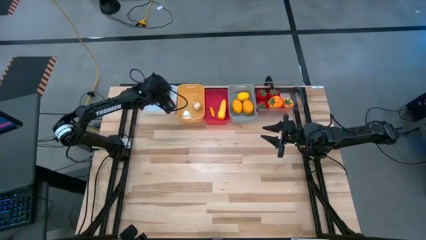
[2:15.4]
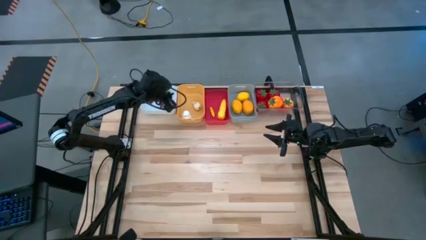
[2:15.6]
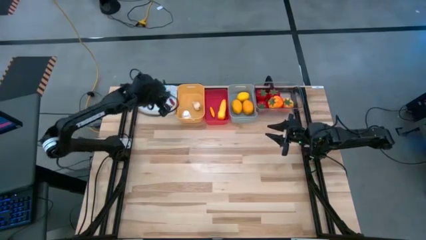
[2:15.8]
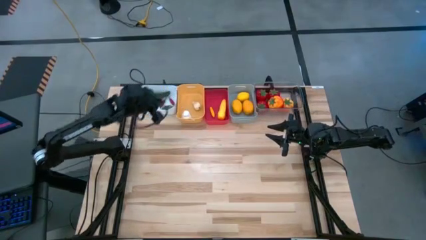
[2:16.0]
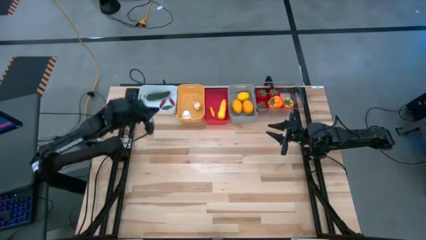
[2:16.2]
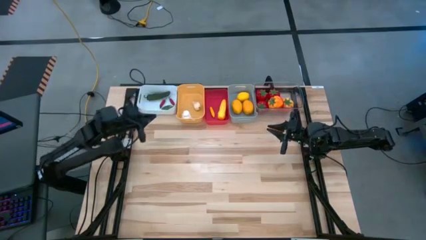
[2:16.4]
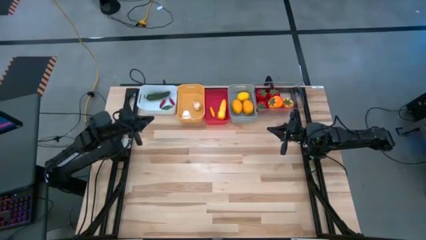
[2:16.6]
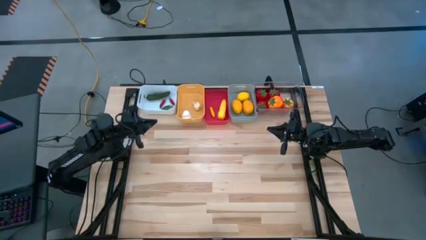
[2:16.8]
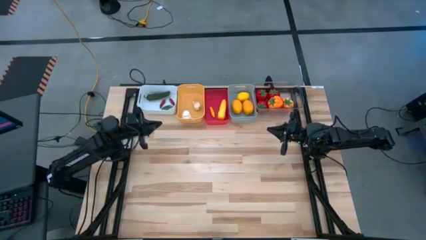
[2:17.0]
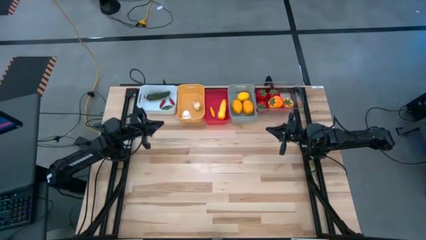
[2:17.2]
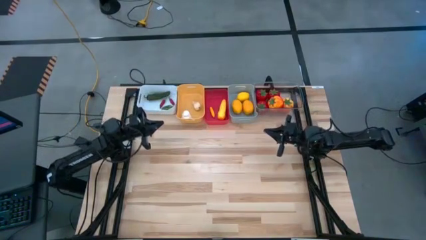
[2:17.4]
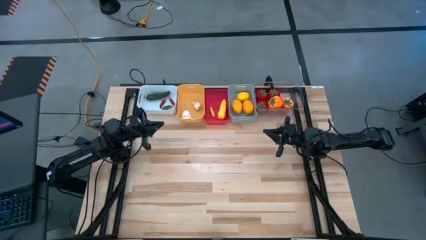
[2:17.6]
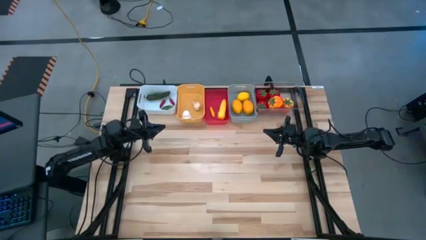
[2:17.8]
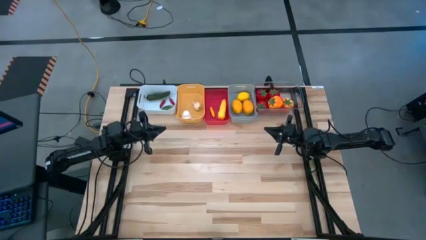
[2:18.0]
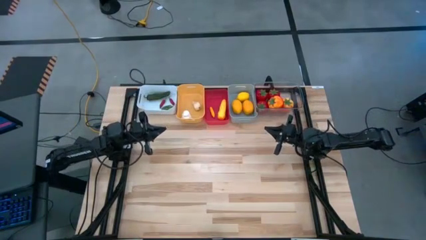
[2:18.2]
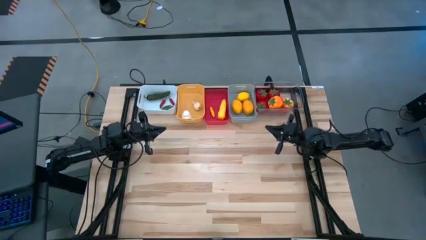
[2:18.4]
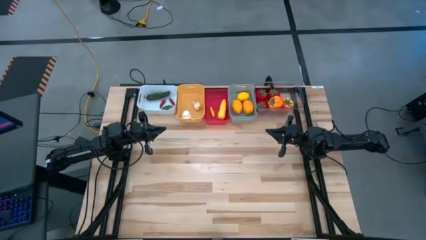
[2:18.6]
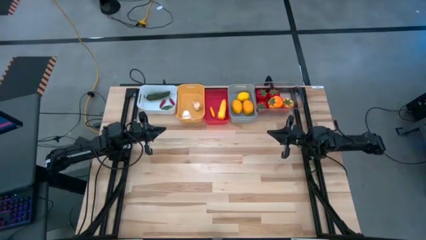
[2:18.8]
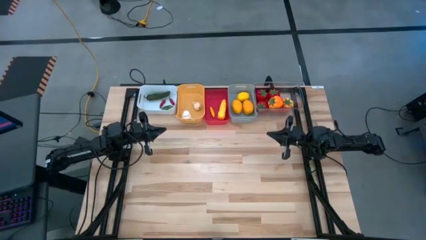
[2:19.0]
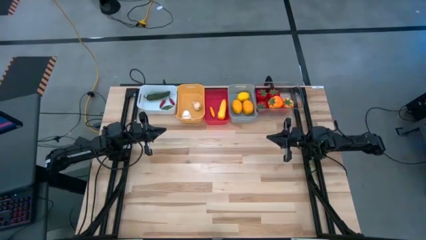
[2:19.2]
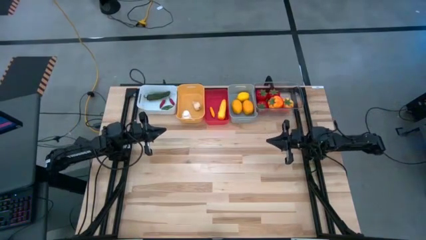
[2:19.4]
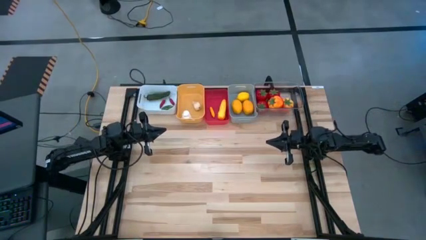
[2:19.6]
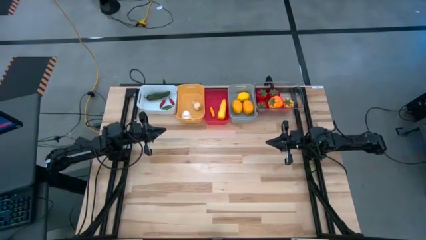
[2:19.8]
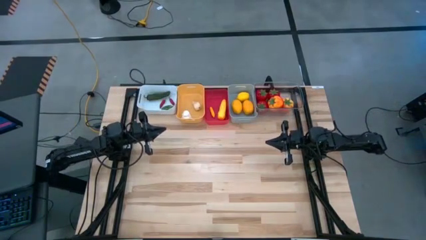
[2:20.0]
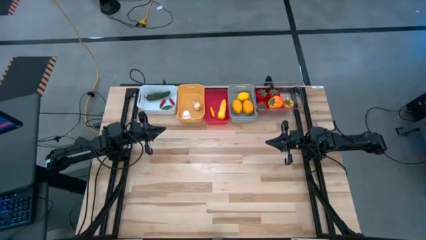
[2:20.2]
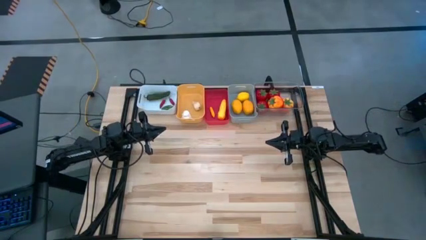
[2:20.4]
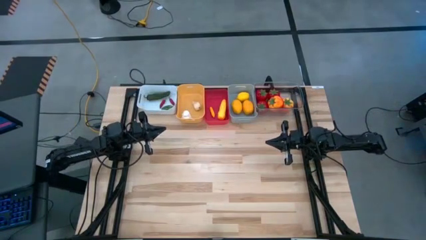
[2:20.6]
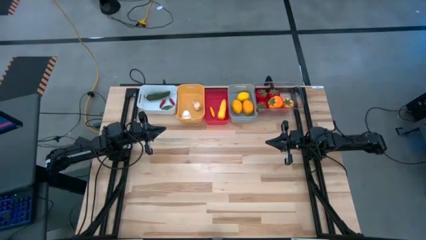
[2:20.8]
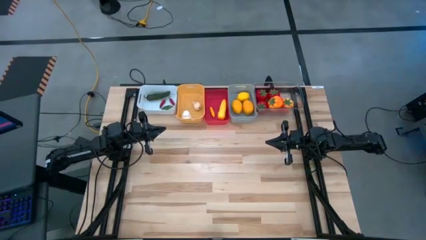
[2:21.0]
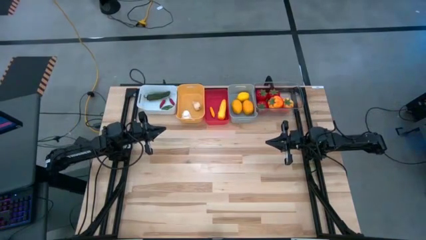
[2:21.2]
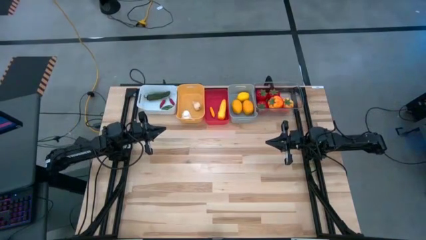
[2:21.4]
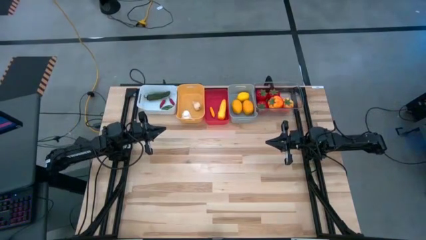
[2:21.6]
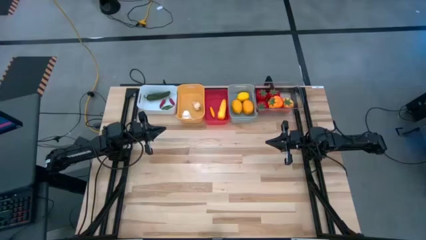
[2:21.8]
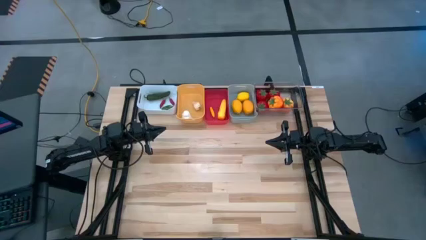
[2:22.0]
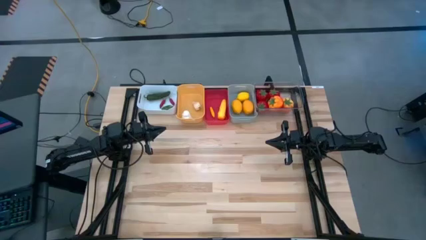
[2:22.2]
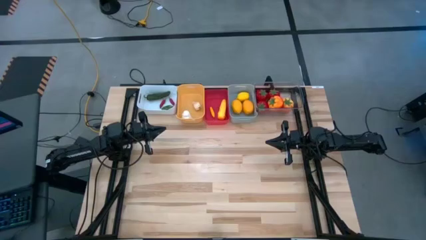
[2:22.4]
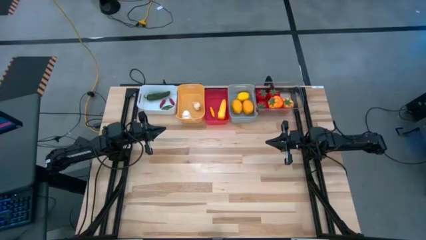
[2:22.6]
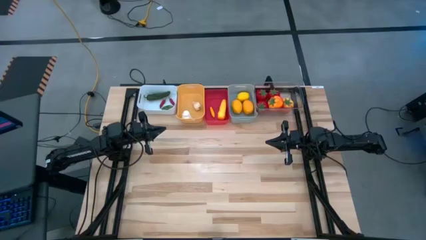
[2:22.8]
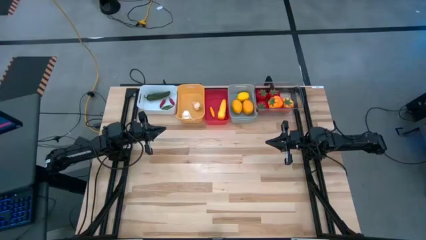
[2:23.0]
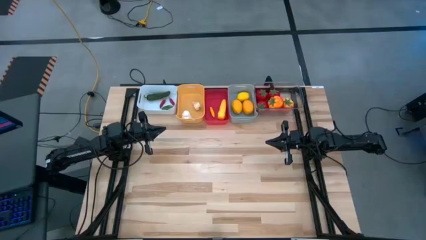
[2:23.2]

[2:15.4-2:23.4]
Task: Sort produce into baskets
Return to Home Position

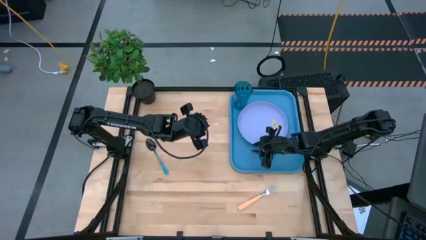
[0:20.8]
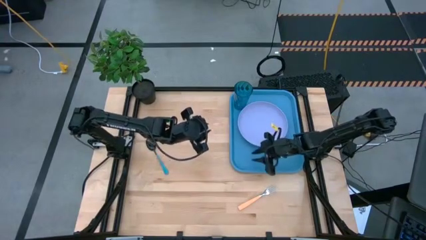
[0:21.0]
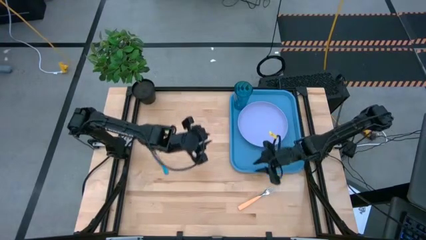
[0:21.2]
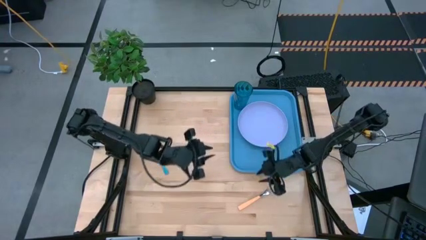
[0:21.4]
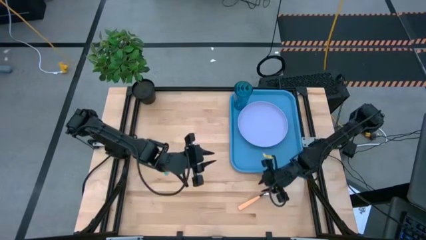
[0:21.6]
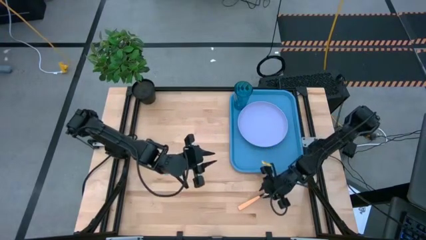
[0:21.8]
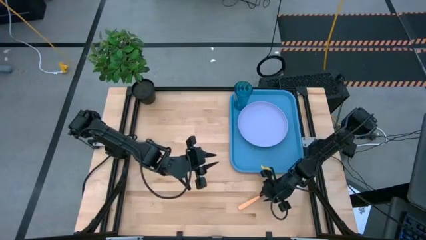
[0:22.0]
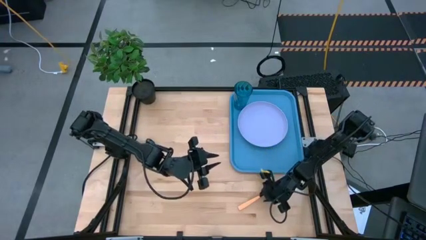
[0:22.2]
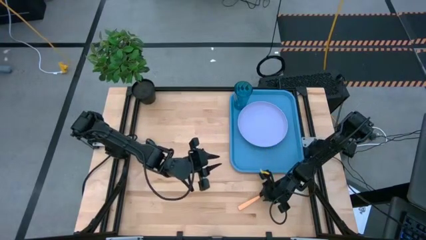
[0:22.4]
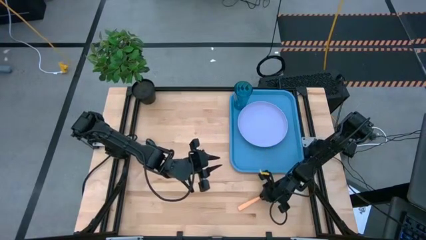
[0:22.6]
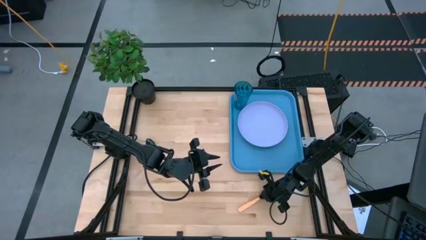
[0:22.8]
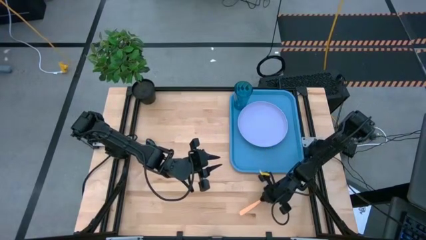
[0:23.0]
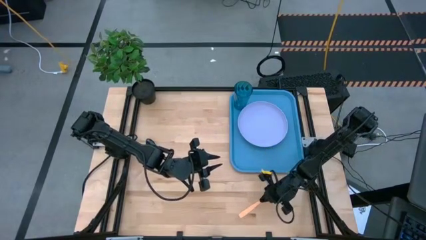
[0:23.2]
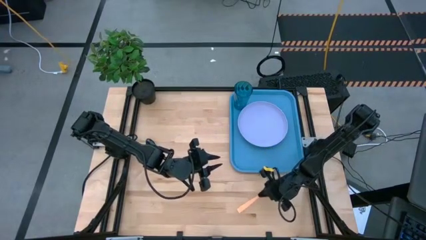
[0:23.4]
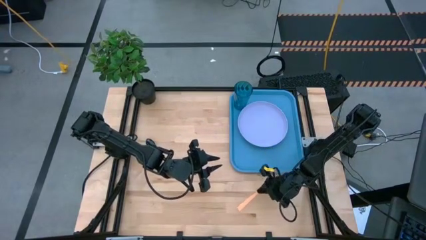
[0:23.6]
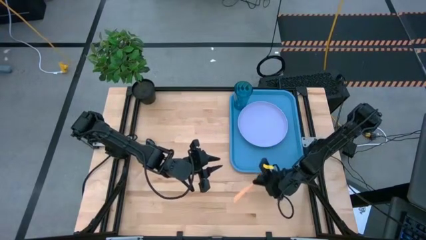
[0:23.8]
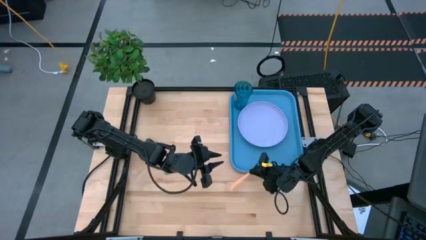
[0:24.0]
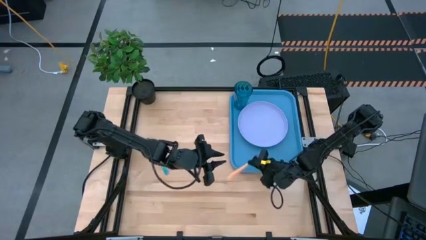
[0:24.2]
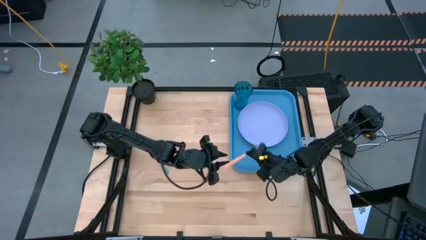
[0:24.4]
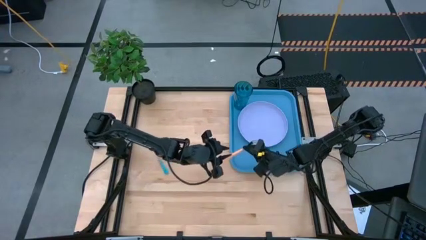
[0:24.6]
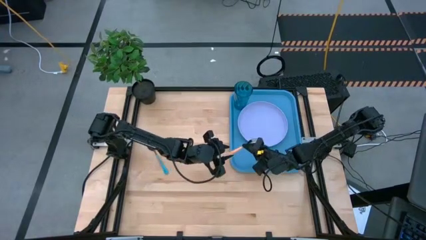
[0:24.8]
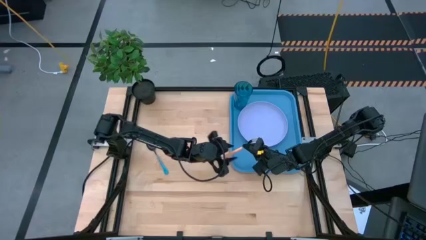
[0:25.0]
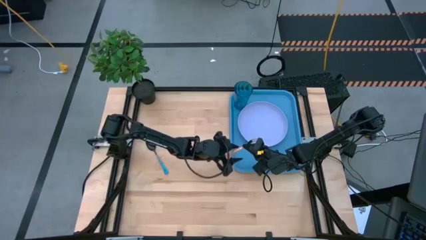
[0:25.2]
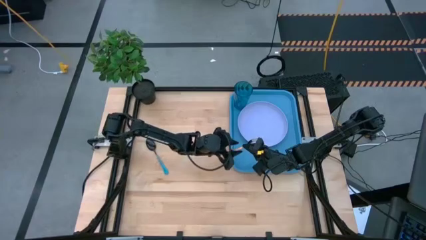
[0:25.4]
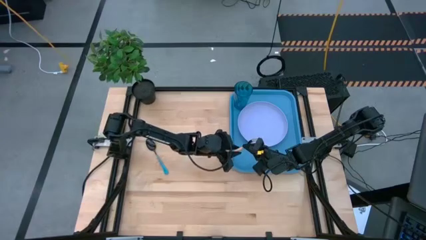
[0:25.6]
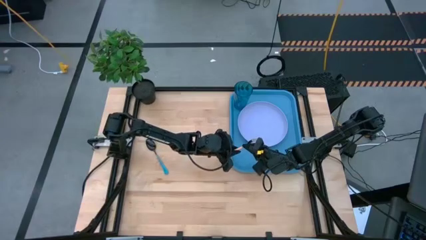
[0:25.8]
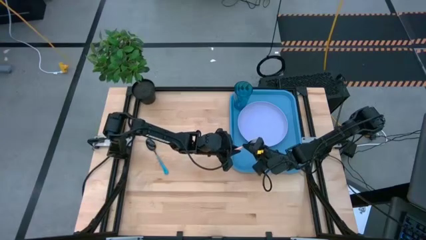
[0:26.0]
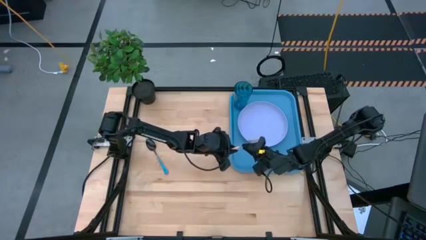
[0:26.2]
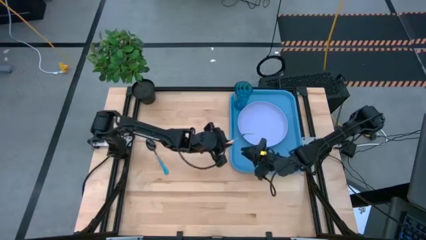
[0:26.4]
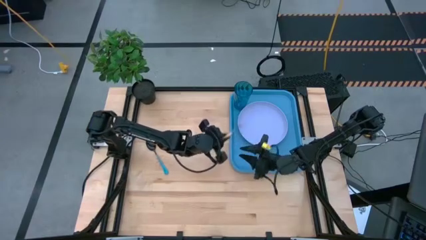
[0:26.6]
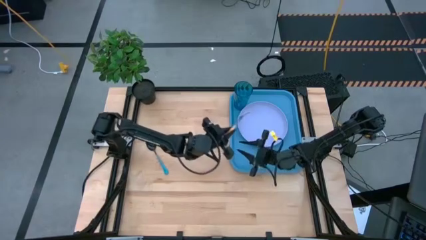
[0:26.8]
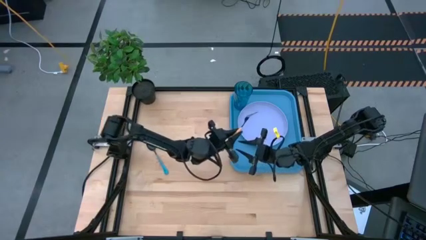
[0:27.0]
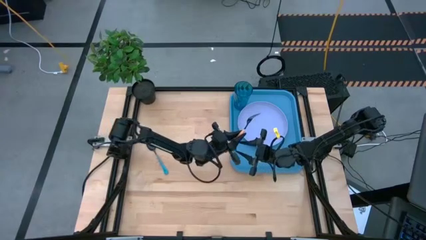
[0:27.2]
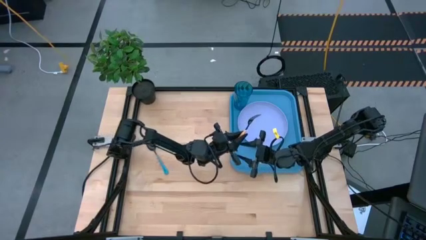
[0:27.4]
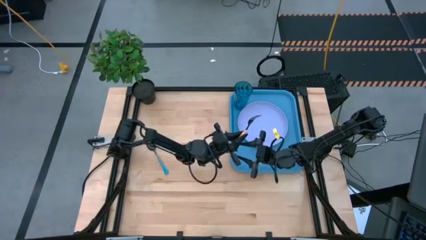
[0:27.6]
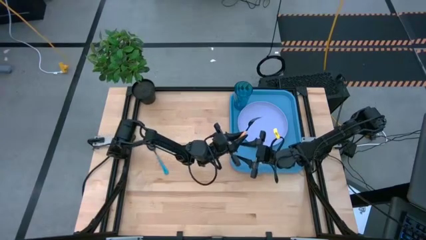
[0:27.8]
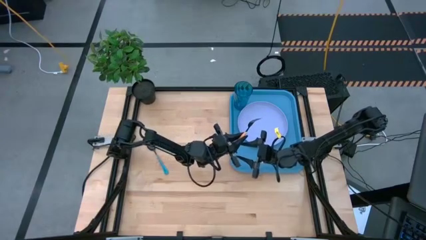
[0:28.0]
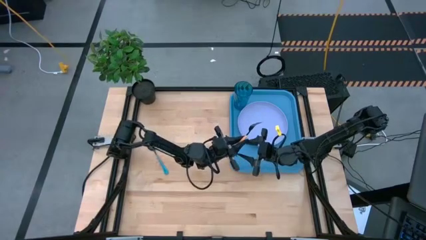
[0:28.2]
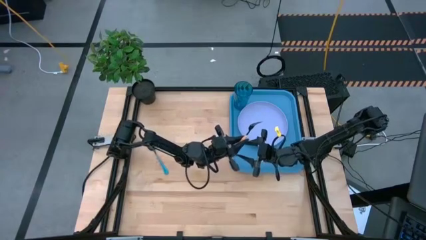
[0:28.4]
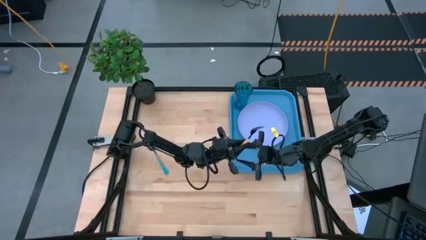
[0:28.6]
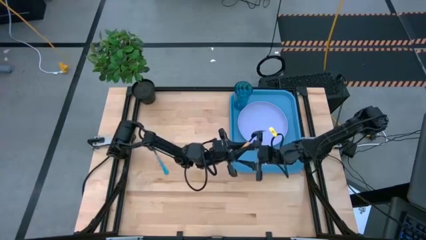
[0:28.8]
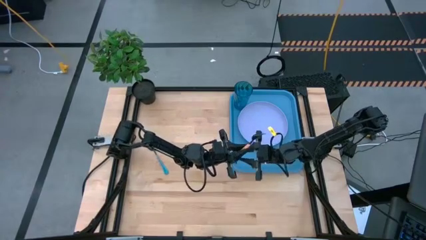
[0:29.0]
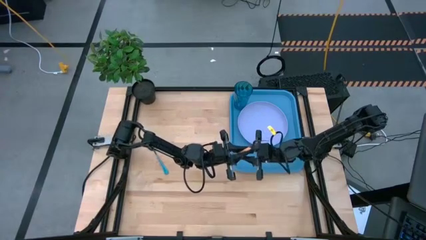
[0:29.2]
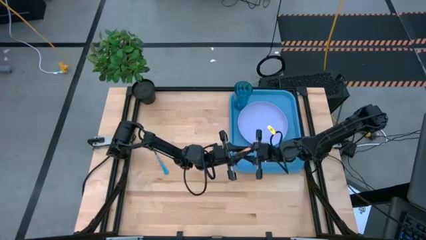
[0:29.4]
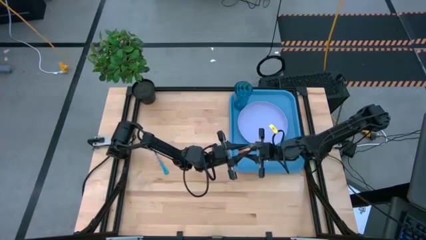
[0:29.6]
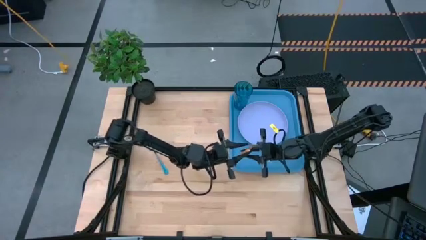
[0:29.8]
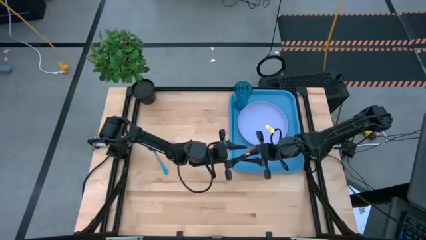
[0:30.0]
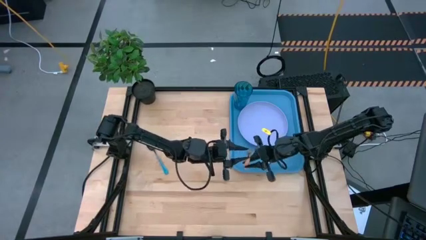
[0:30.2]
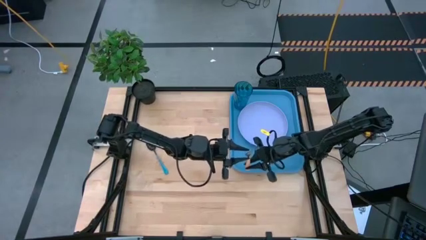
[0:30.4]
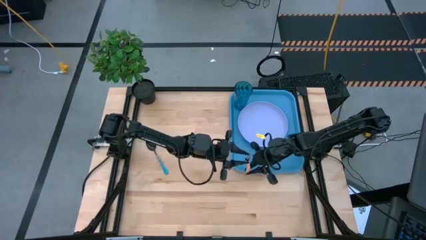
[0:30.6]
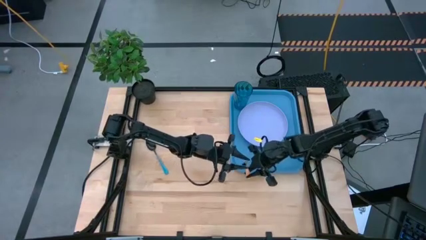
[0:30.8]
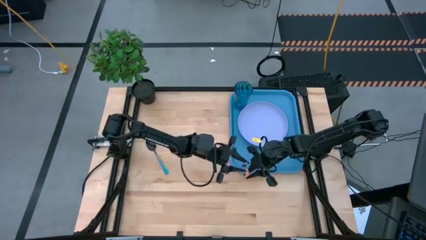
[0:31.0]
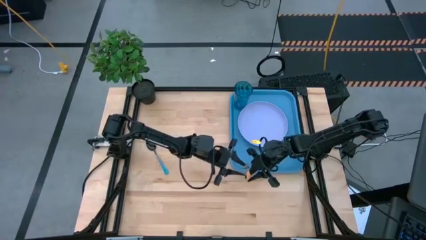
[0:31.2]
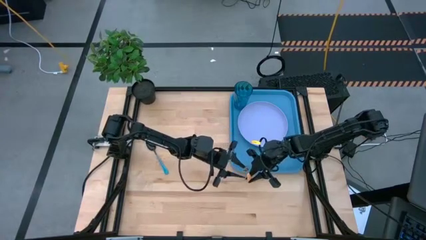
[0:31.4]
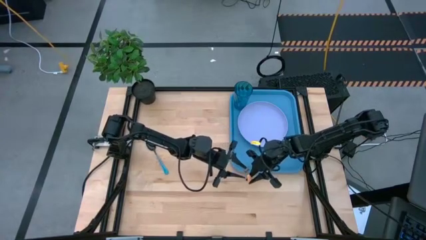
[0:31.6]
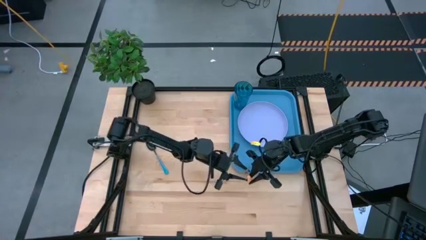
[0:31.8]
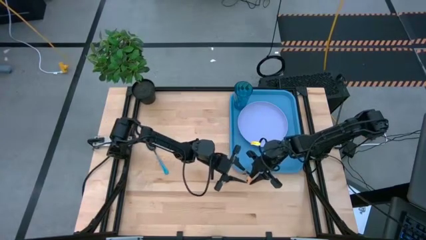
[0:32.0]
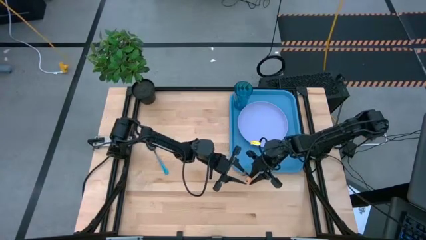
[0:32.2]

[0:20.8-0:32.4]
Task: Pick and place plate/cup/fork/spoon on tray
Put the brown fork on the blue table tray under the purple plate
